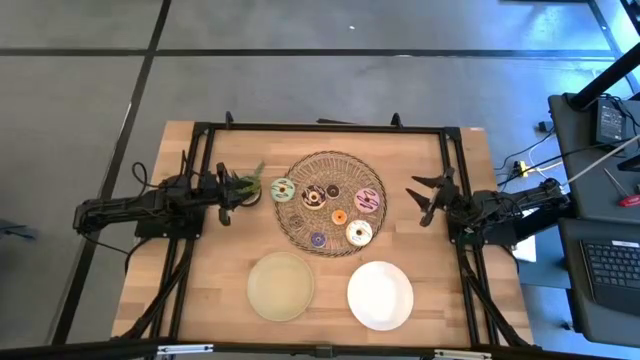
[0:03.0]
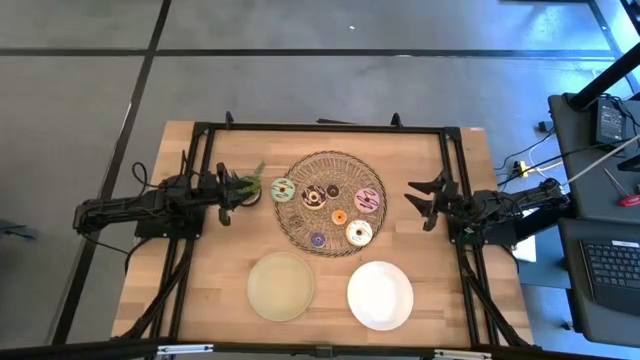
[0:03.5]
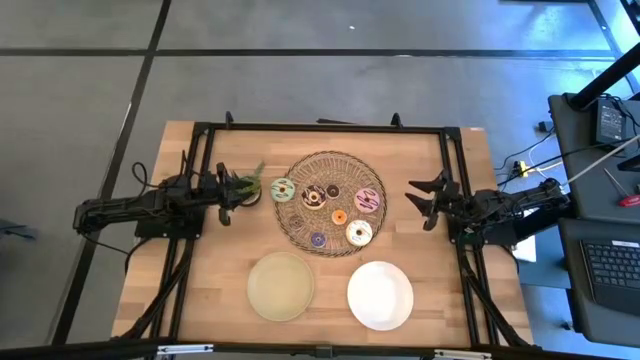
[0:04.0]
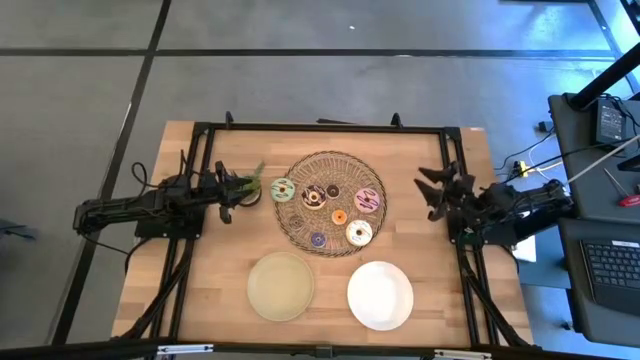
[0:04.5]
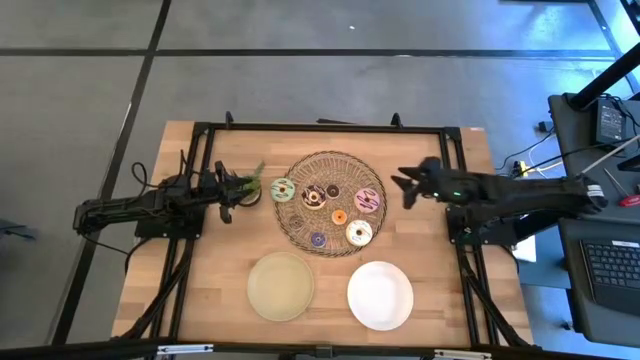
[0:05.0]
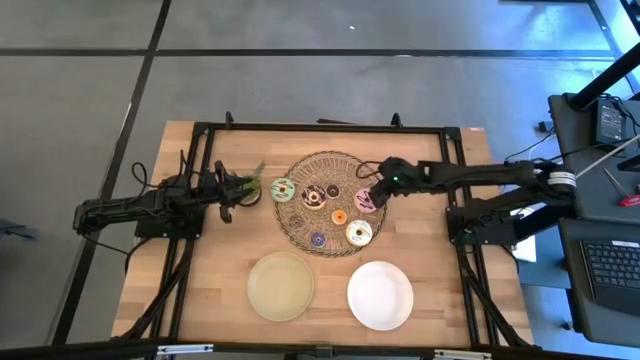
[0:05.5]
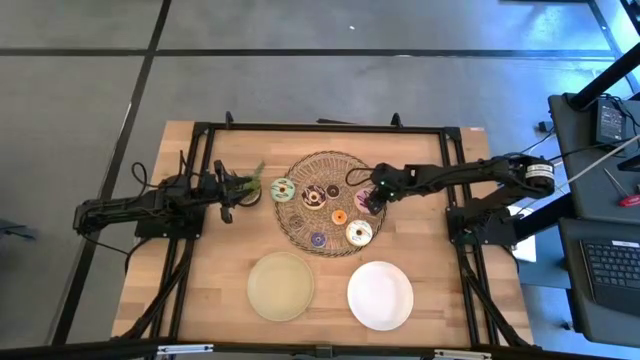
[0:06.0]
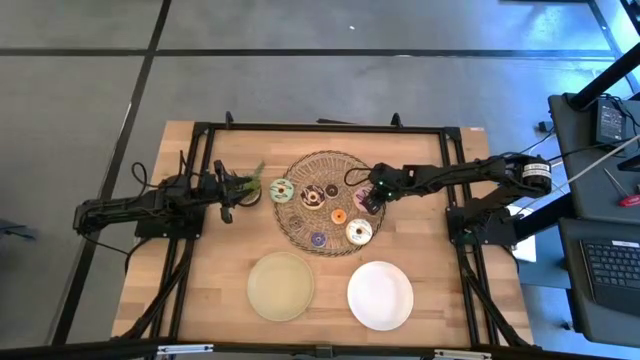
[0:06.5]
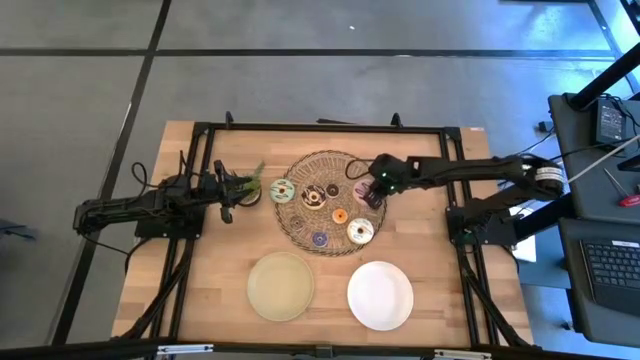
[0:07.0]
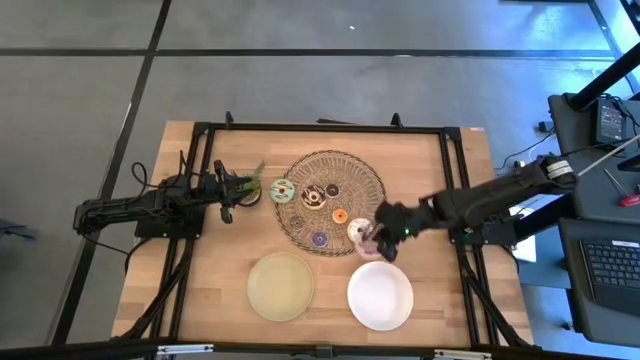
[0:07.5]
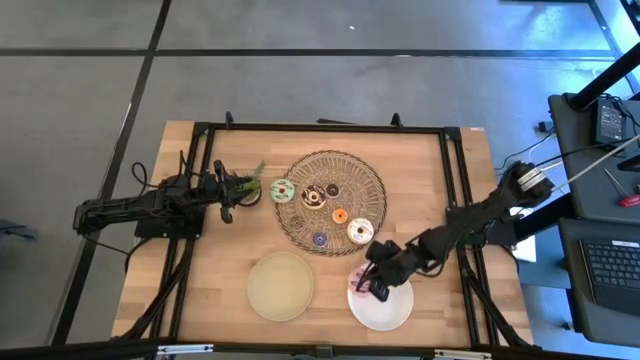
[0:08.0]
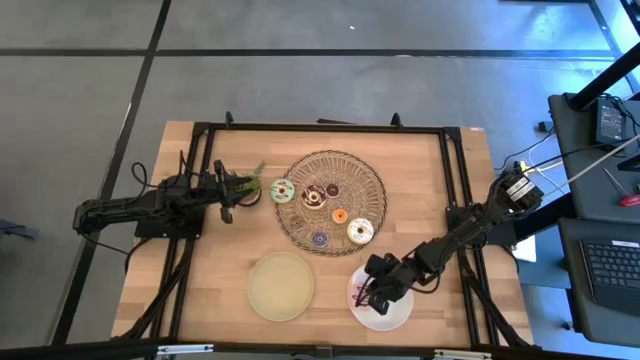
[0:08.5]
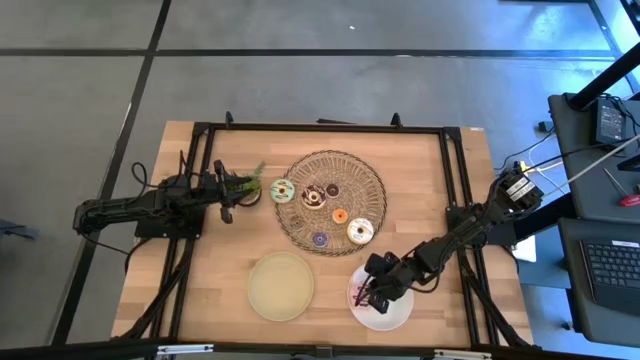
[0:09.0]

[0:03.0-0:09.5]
Task: Pick & Place donuts
Put the big pink donut on the white plate

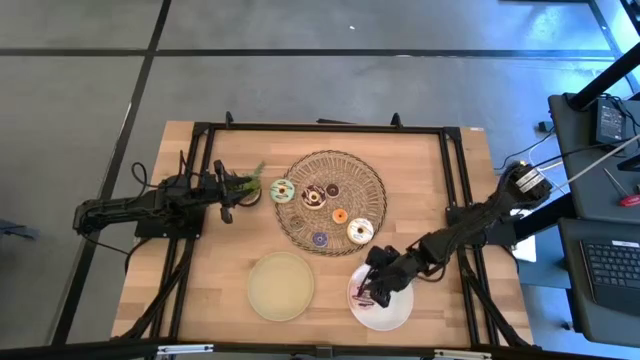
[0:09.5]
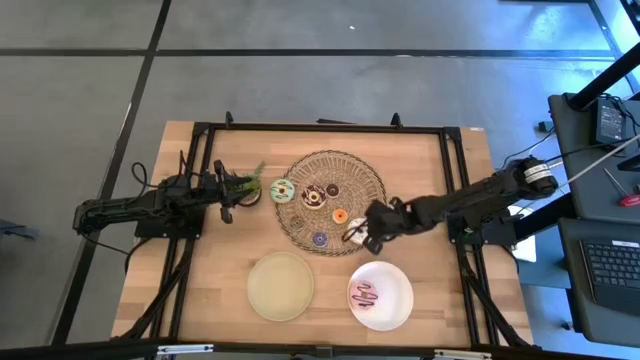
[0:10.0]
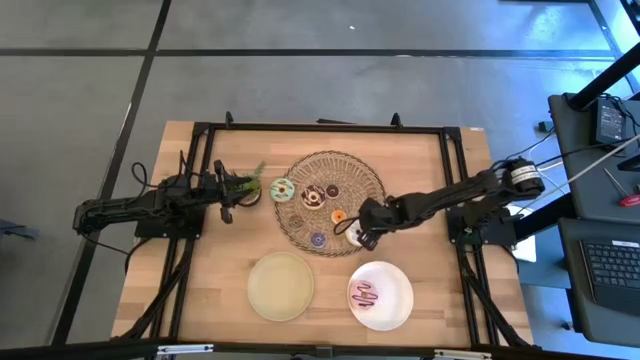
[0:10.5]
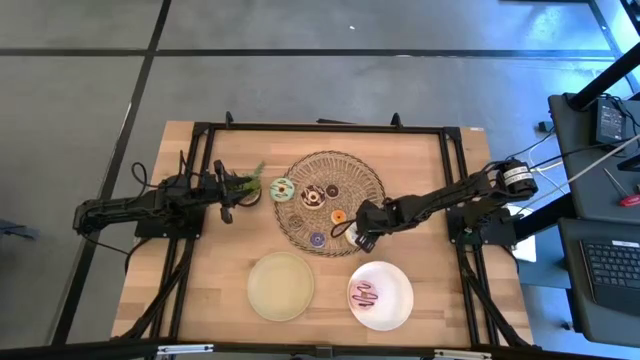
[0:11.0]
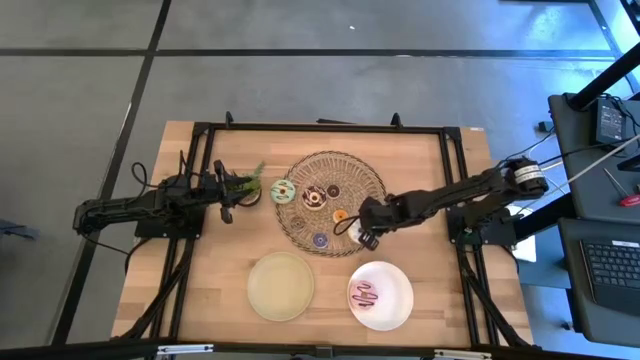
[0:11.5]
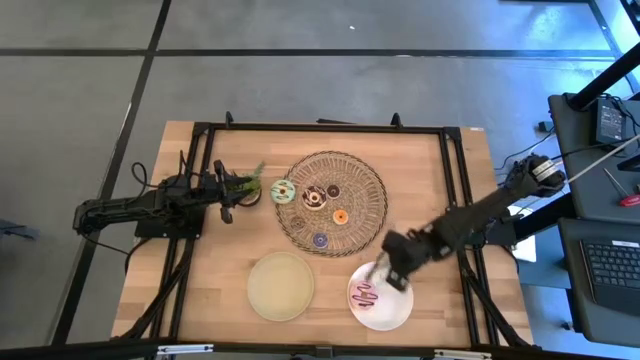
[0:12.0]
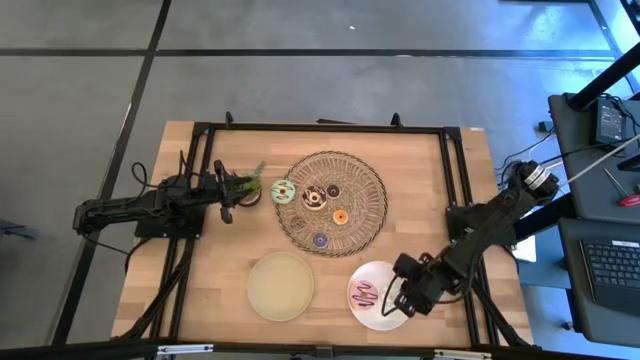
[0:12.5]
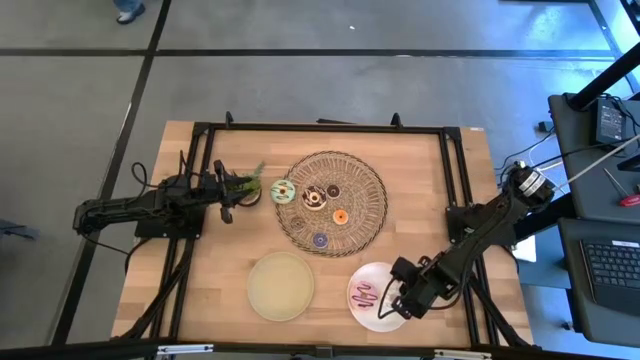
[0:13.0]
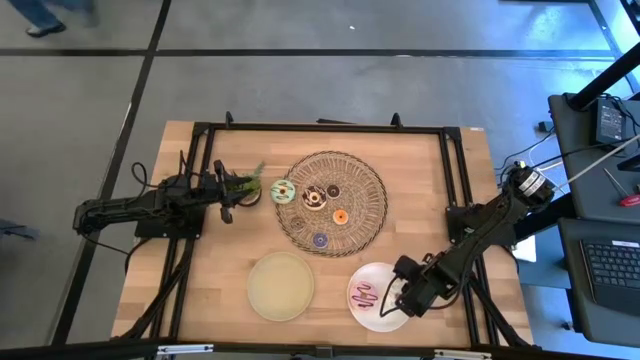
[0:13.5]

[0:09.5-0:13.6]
Put the big white donut on the white plate

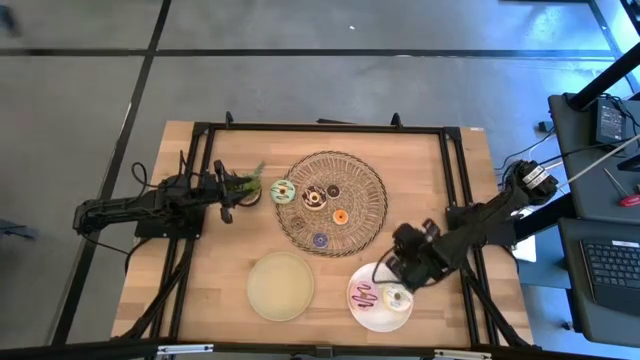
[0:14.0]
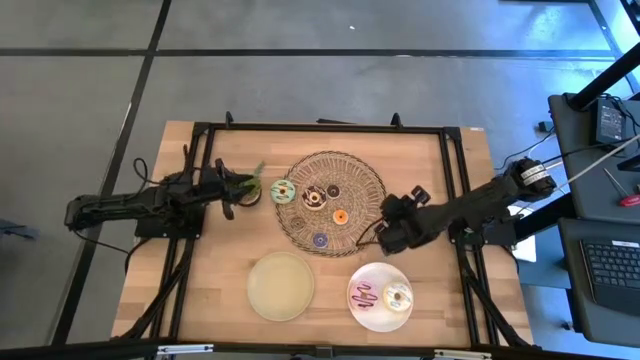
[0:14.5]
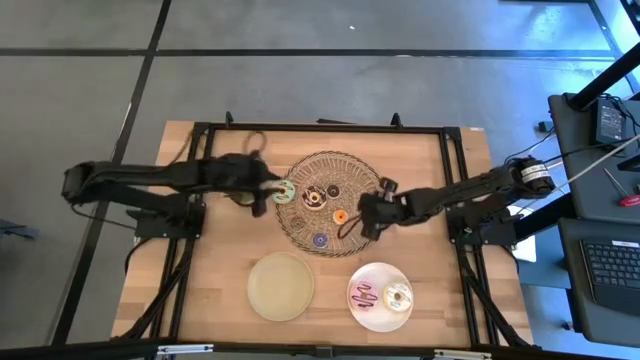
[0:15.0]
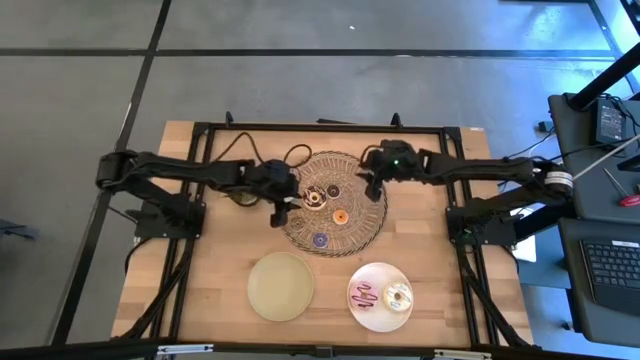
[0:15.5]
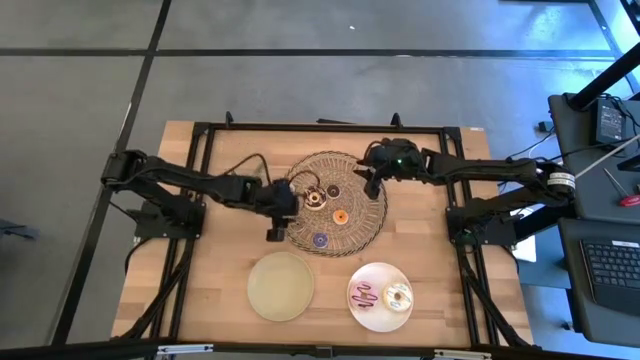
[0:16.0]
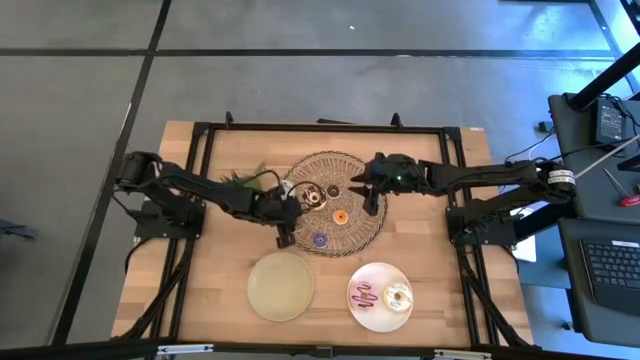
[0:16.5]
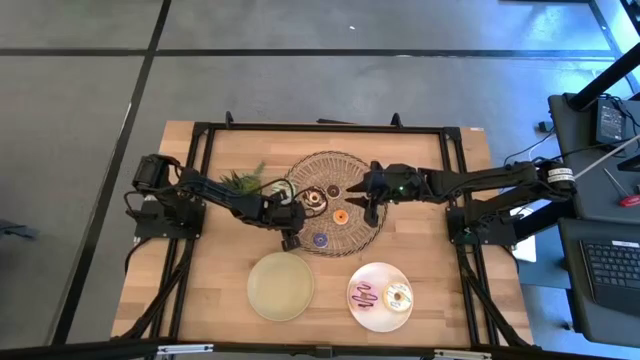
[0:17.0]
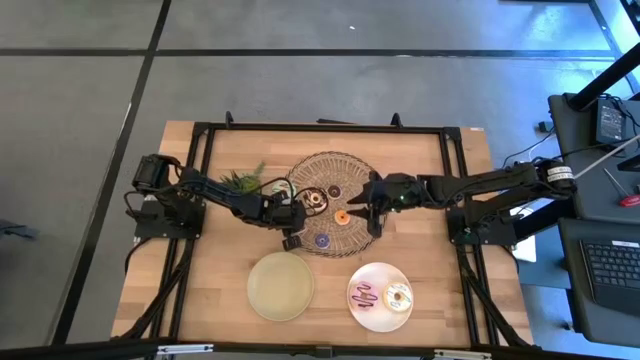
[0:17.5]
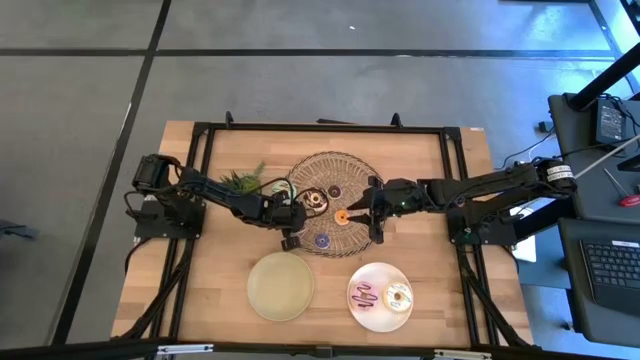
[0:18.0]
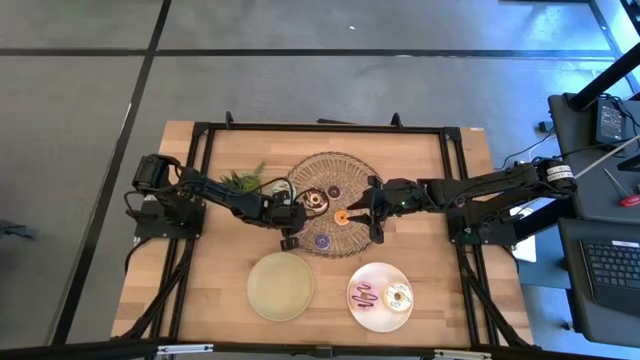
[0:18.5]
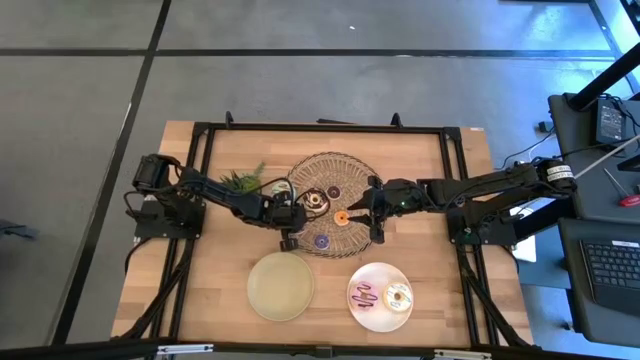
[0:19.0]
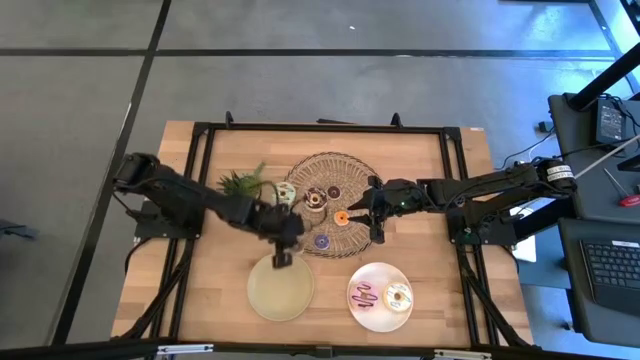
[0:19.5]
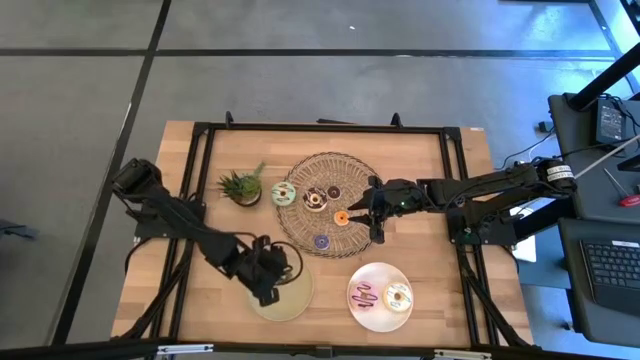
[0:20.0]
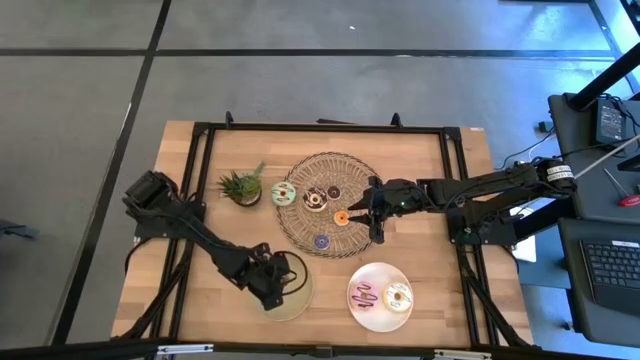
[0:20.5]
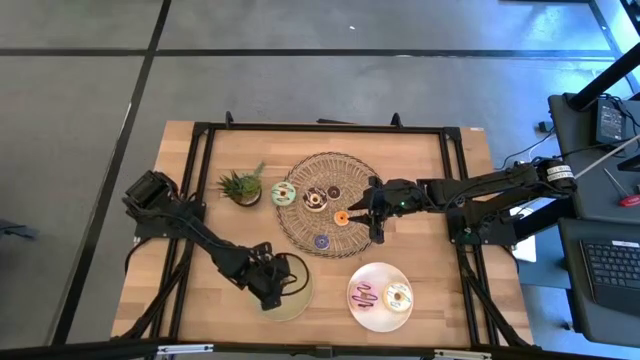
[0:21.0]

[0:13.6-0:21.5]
Put the bottom small black donut on the light gray plate

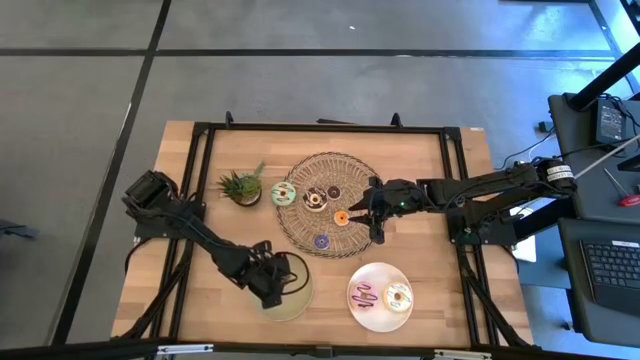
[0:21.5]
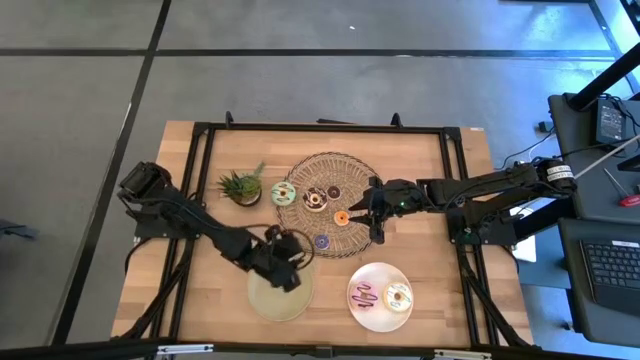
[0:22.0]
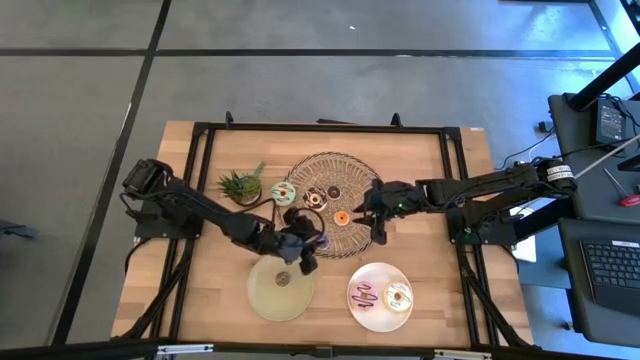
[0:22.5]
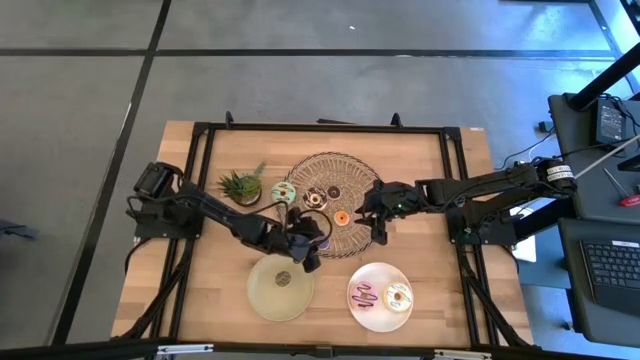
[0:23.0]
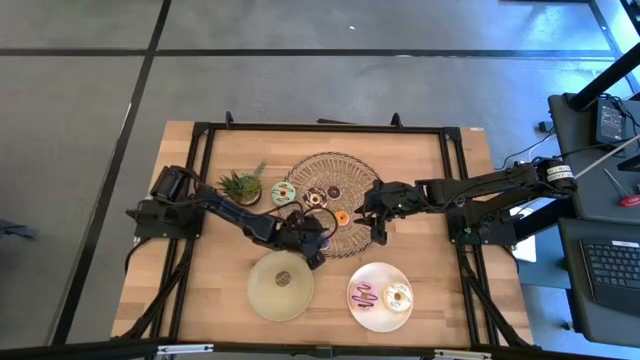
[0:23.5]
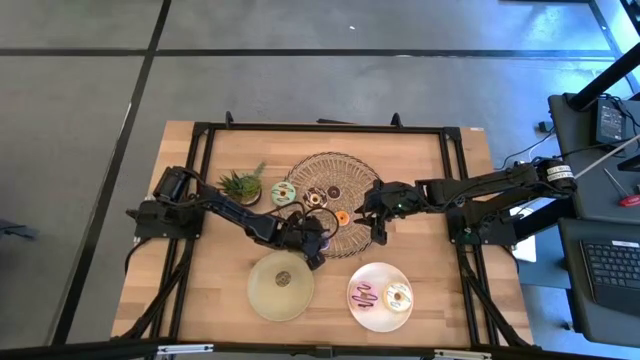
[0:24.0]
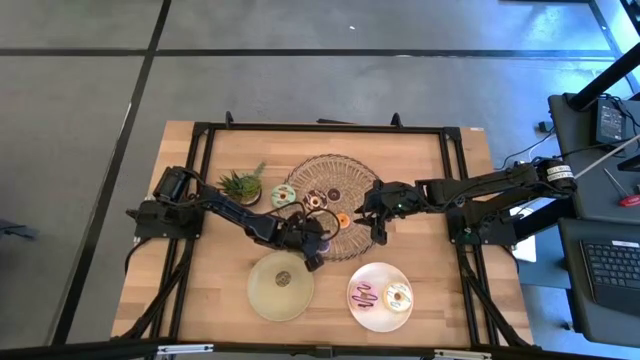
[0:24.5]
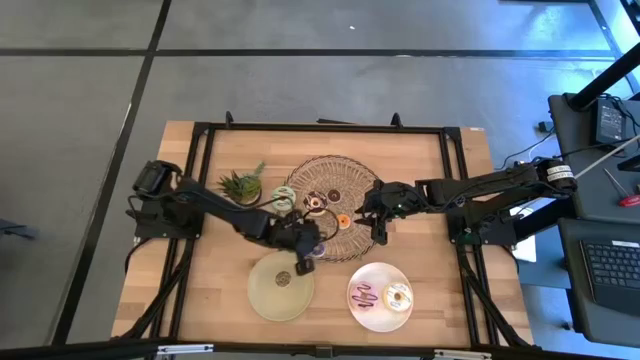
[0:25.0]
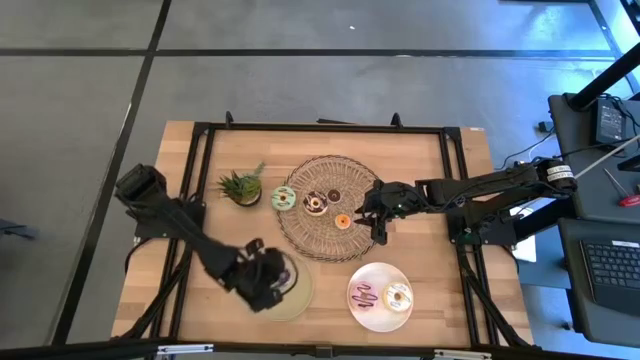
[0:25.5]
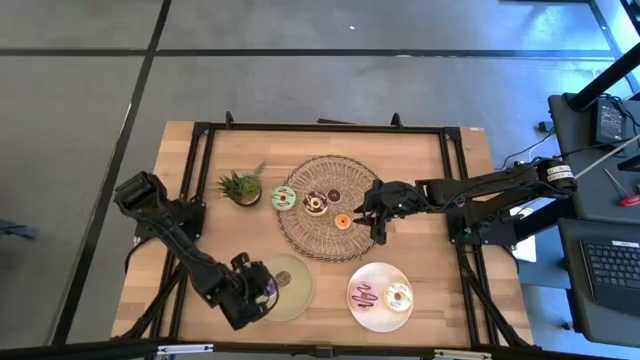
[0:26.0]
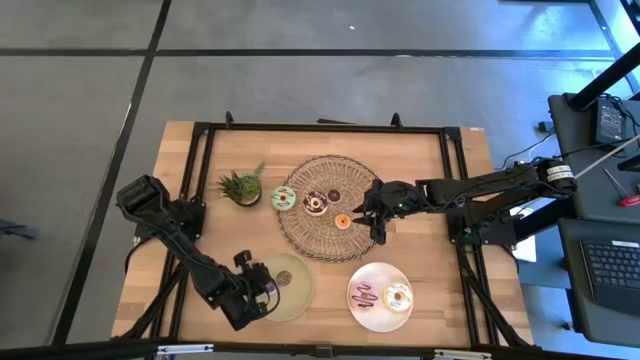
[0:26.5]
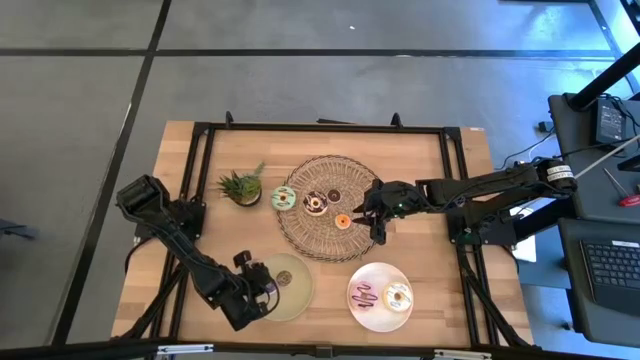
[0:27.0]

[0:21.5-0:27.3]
Put the small blue donut on the light gray plate
